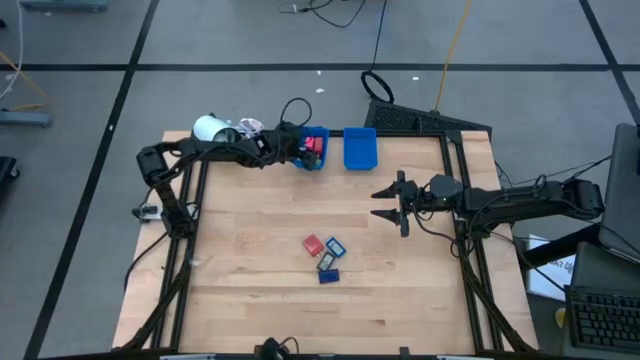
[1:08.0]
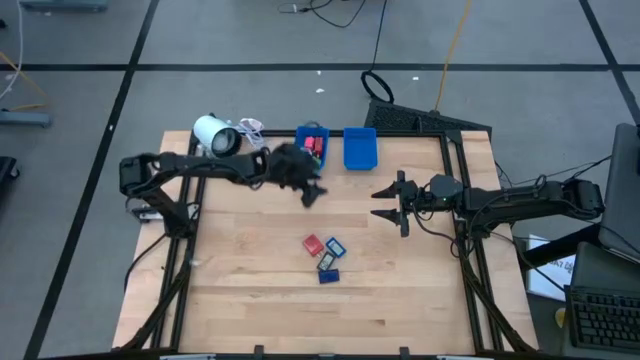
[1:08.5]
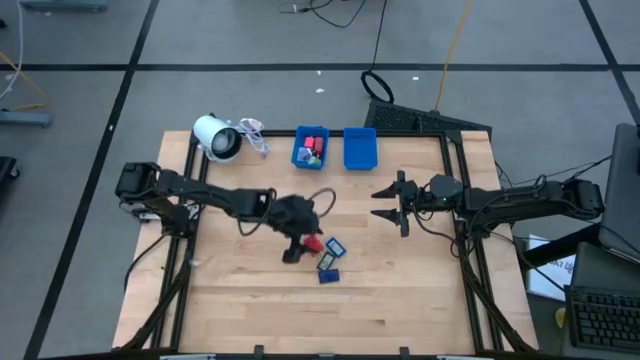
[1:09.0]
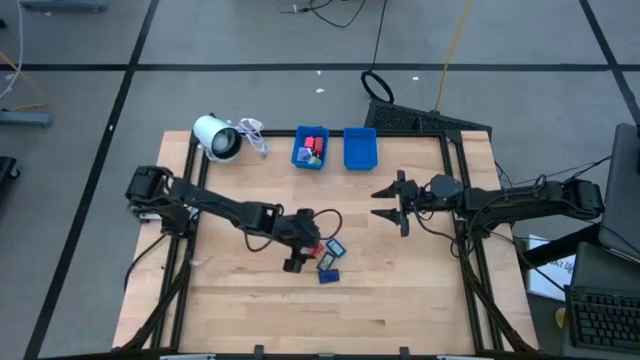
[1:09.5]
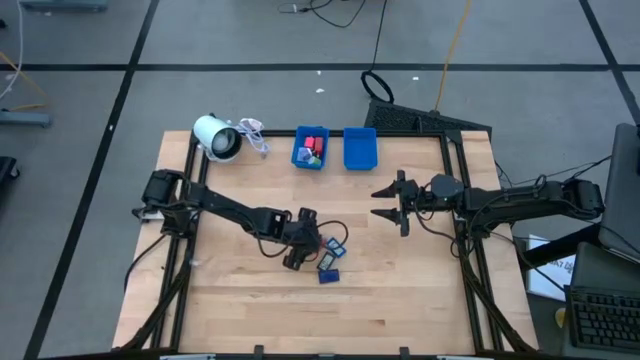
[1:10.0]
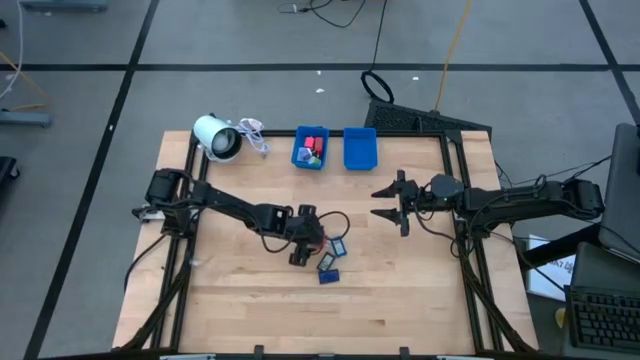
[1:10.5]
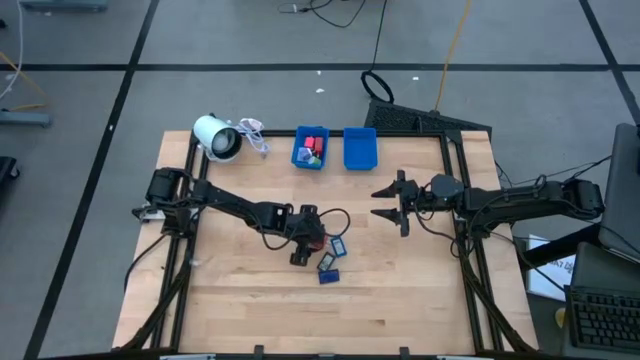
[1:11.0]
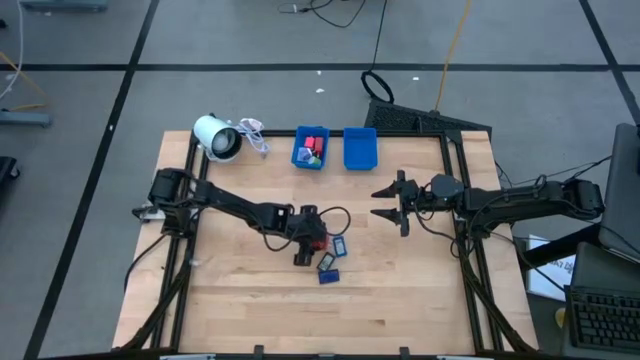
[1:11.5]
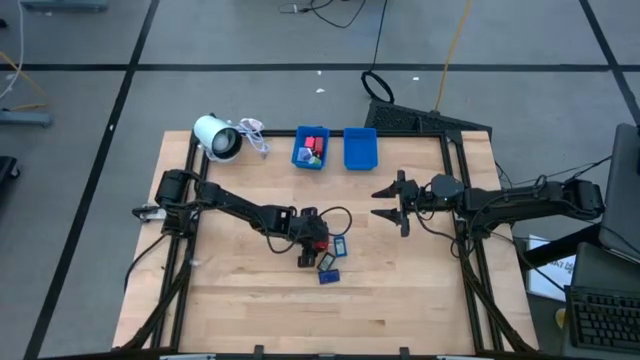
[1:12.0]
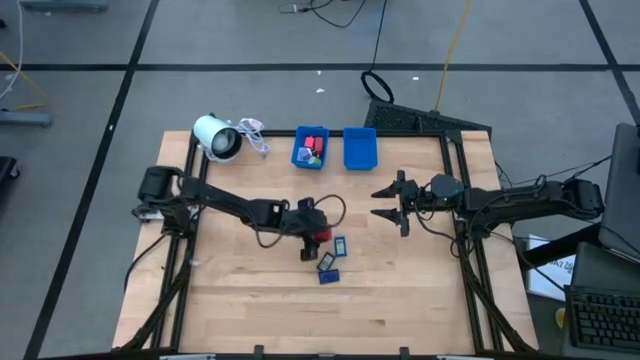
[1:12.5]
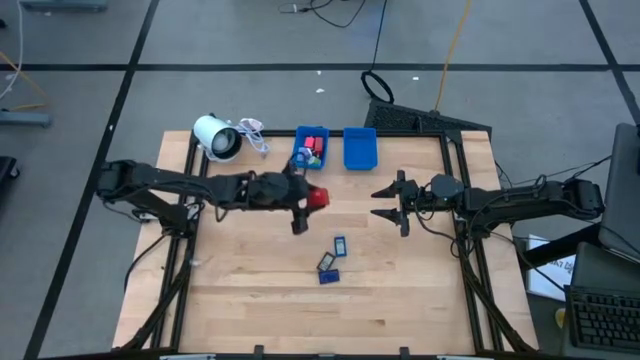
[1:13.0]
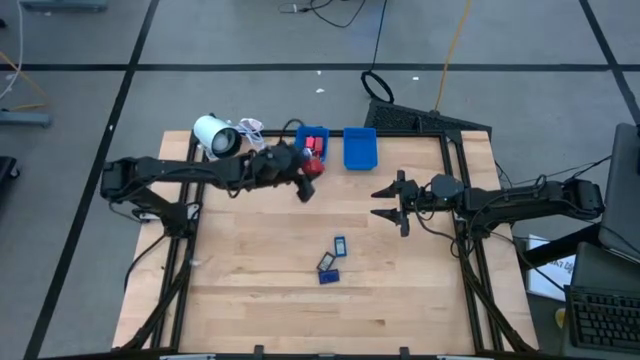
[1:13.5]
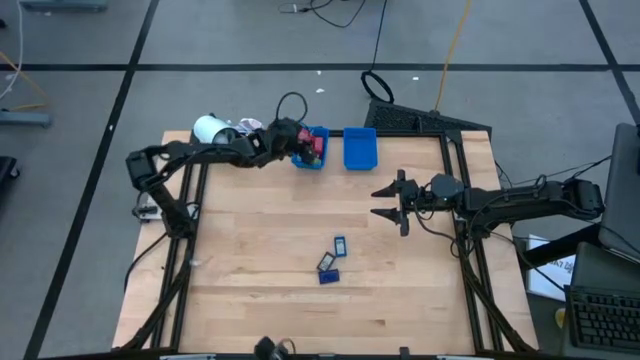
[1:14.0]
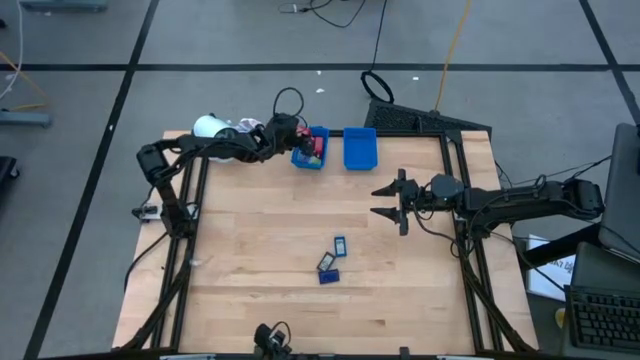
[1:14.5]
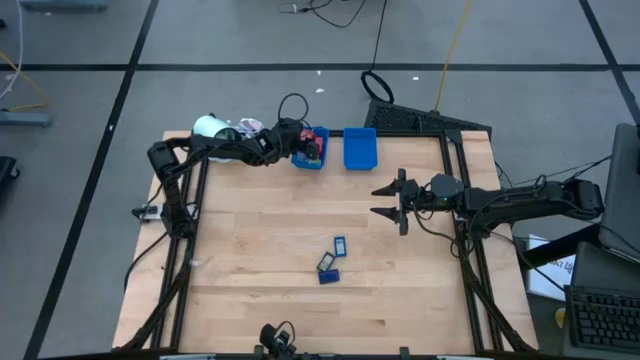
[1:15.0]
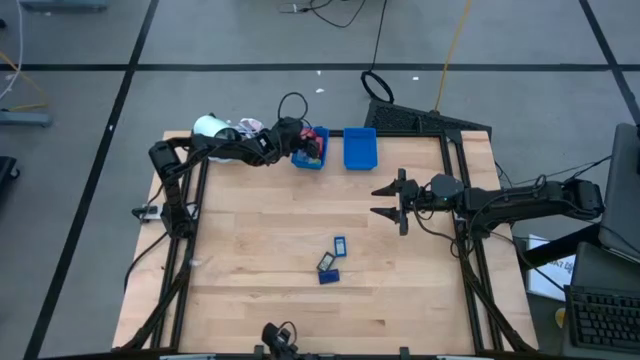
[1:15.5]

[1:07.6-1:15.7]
Task: Pick & Place Office items
Put the red charger adapter into the left basket

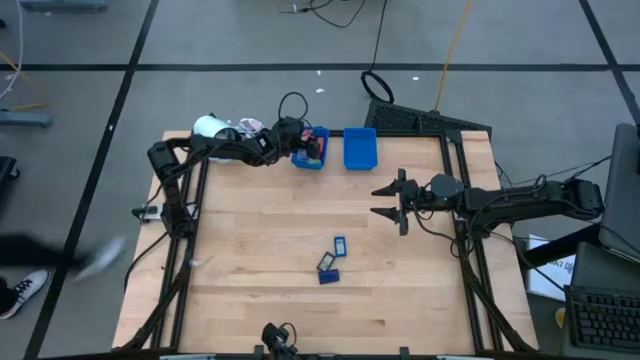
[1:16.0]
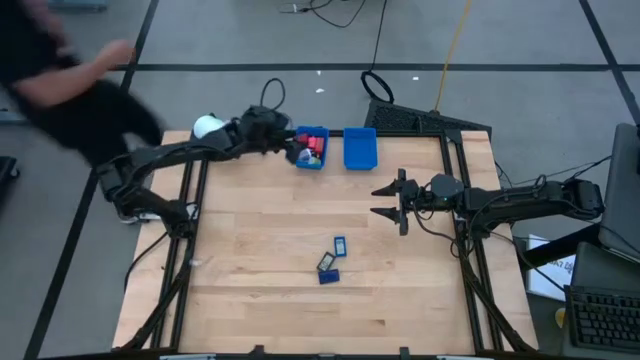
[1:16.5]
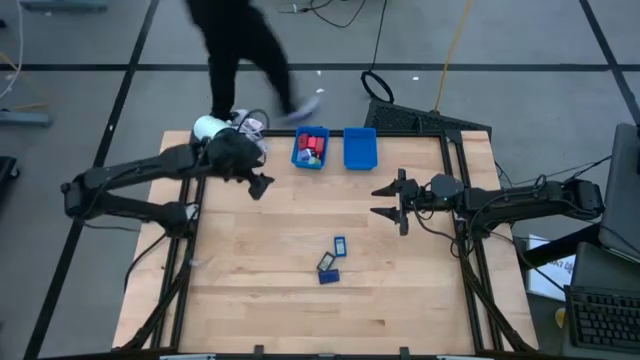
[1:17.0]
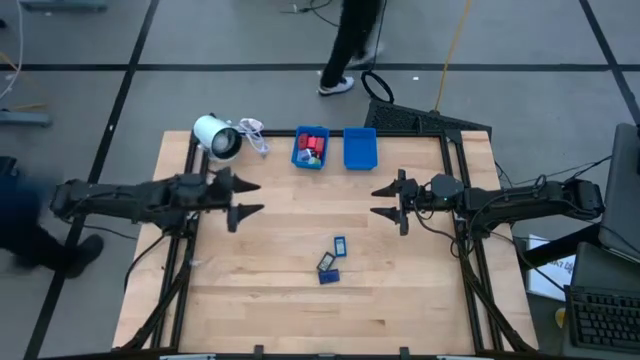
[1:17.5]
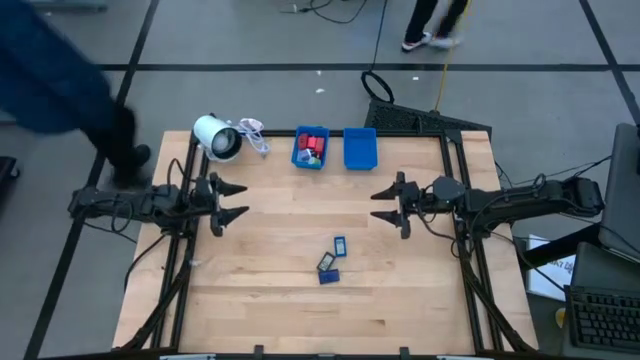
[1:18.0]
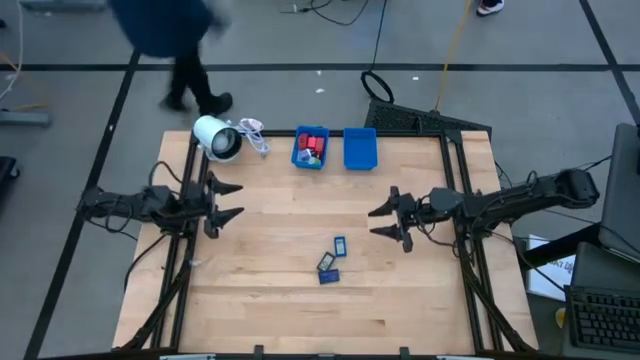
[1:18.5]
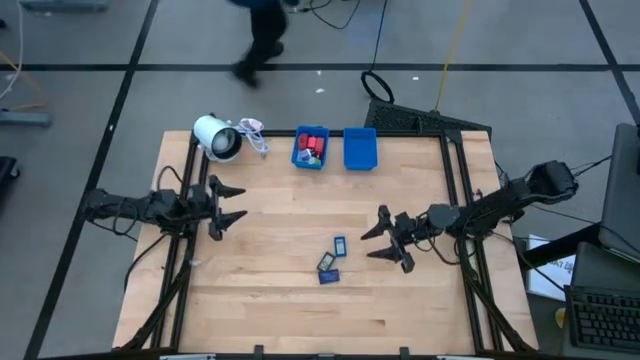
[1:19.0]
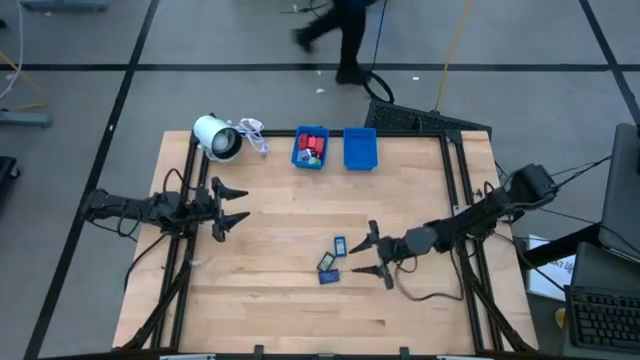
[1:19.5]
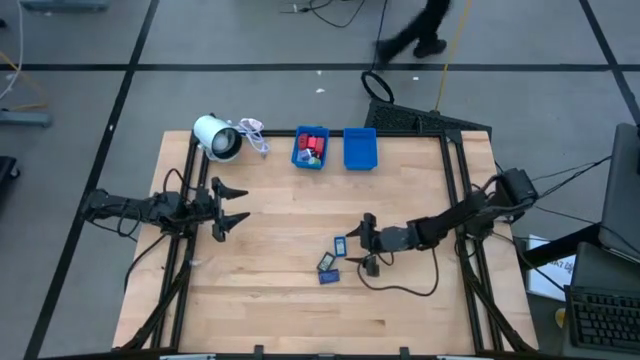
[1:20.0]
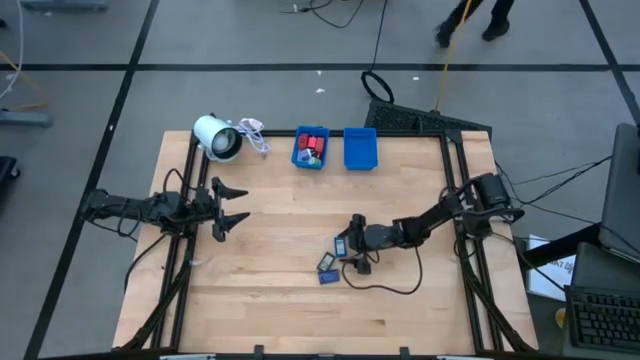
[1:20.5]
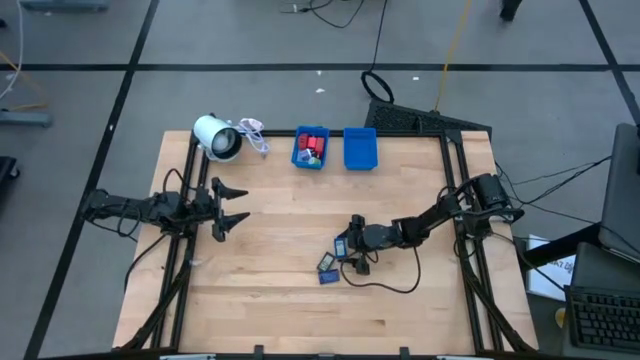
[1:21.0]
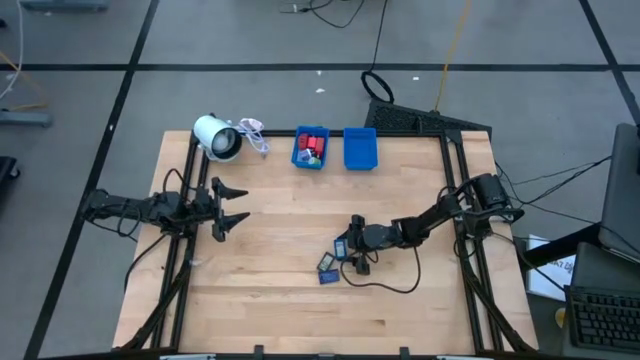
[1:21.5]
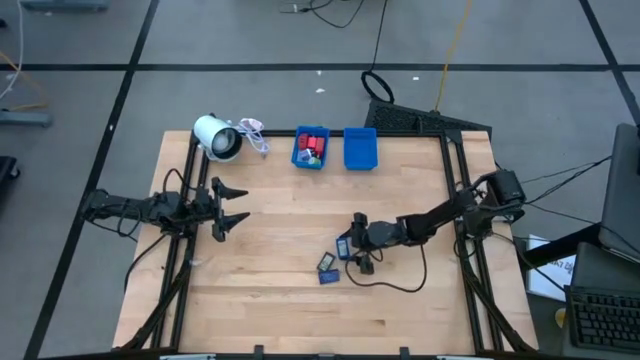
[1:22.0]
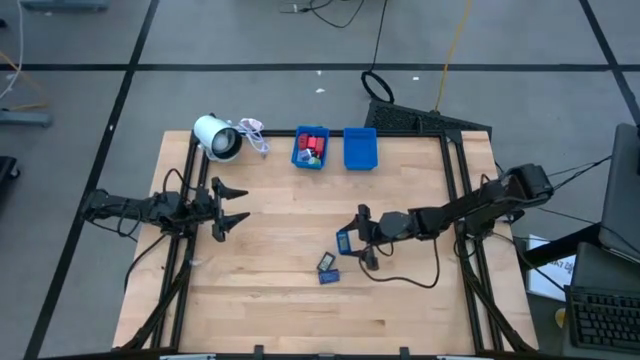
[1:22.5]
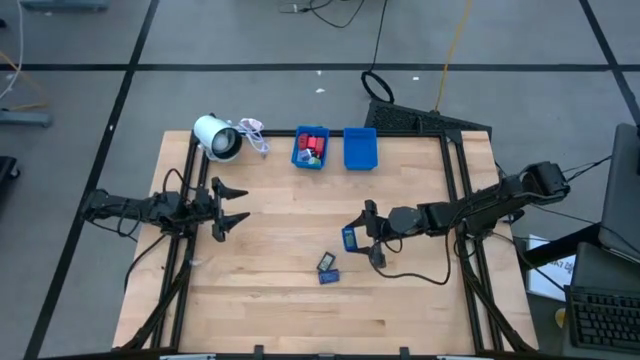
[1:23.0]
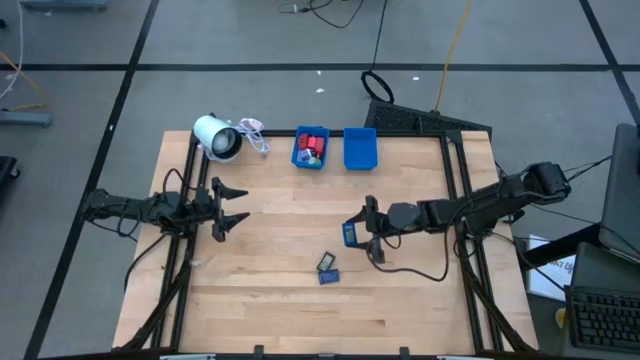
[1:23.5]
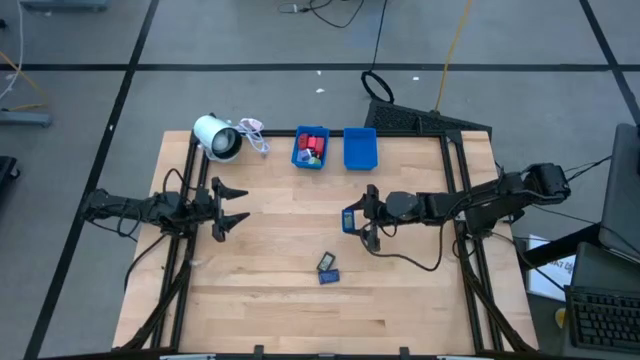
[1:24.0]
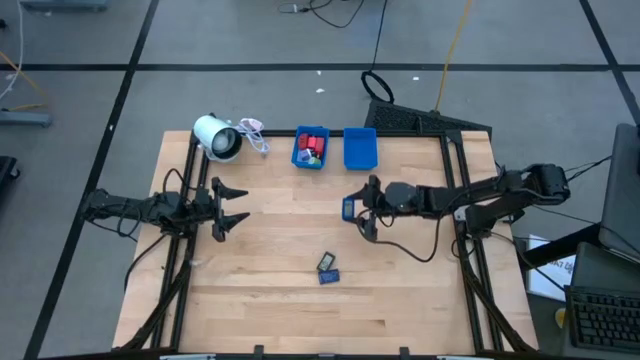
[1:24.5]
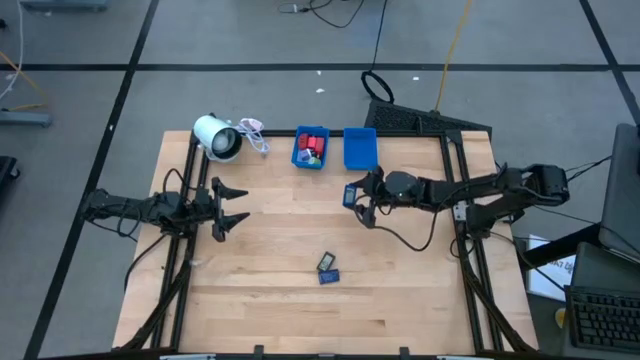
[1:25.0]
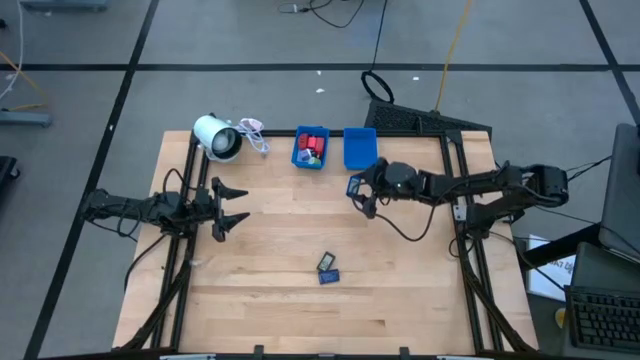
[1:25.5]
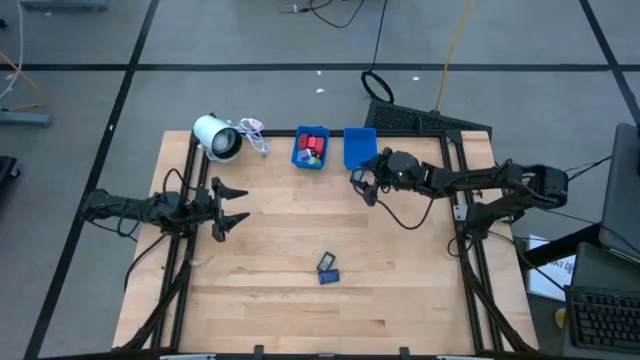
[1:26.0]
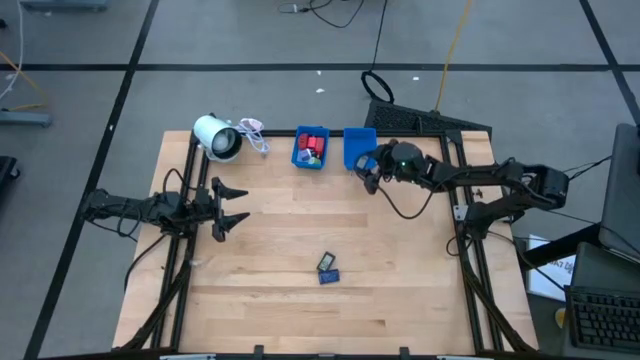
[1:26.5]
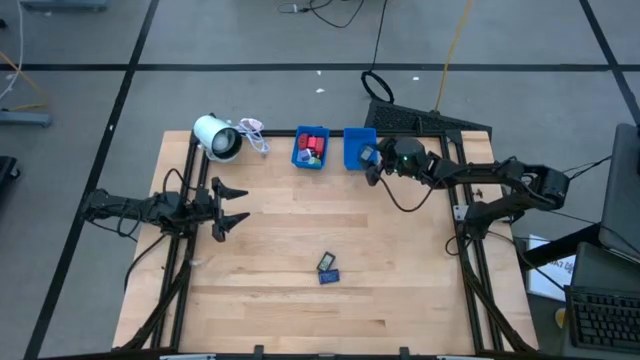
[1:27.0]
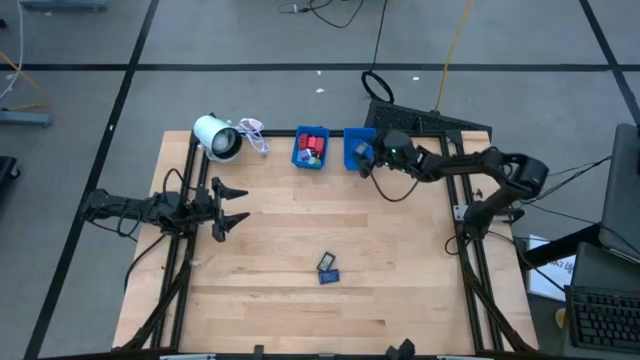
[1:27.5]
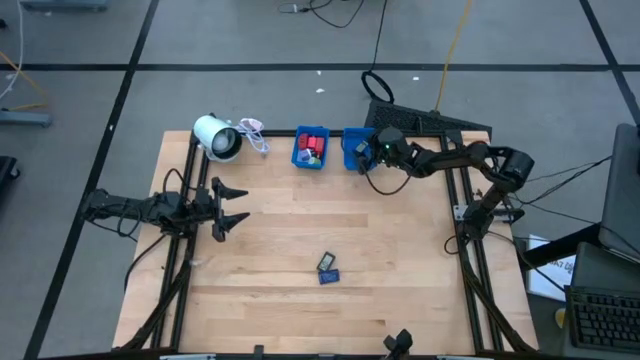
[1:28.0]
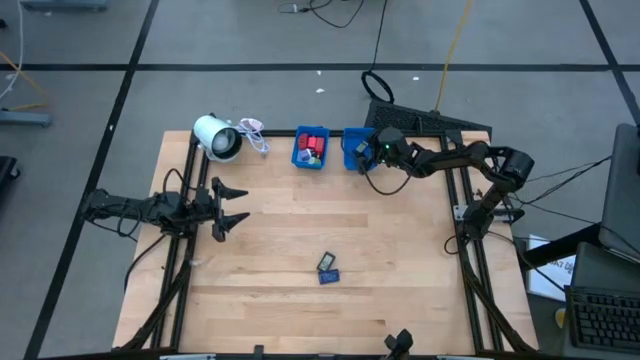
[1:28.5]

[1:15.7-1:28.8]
Put the top blue digital clock into the right basket
